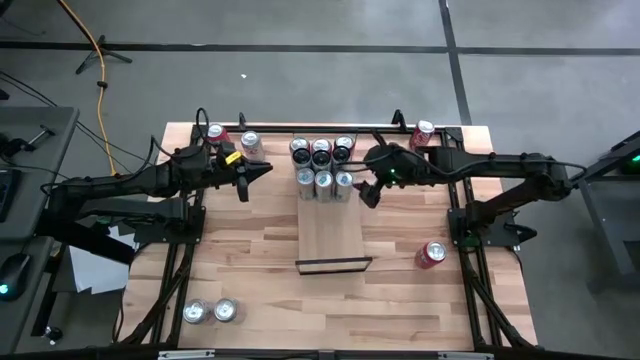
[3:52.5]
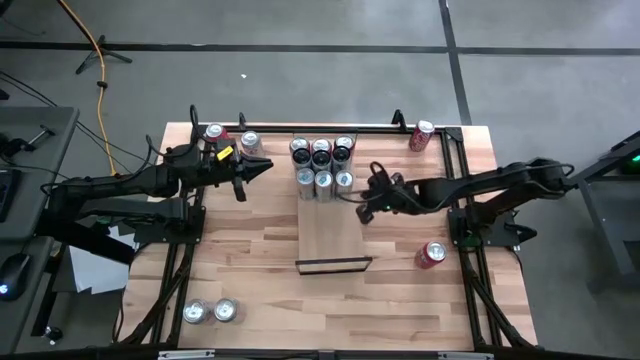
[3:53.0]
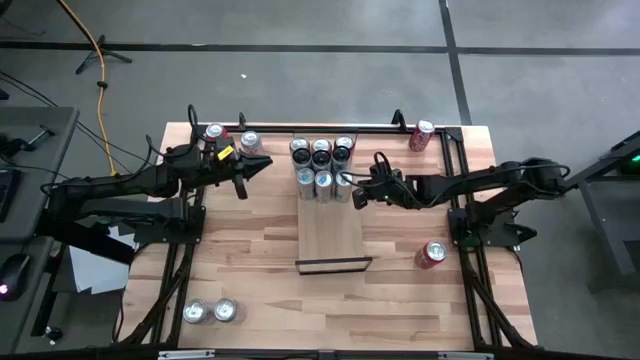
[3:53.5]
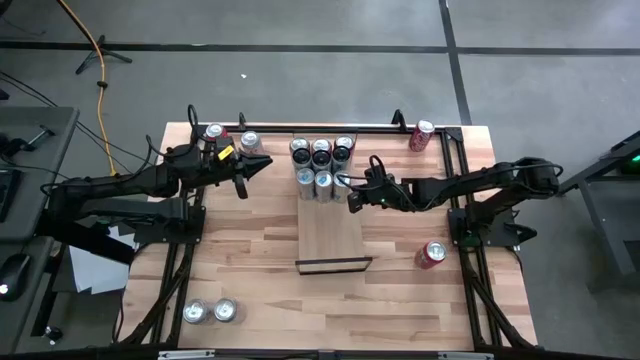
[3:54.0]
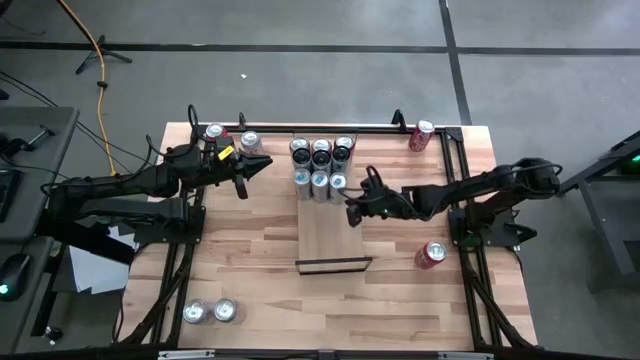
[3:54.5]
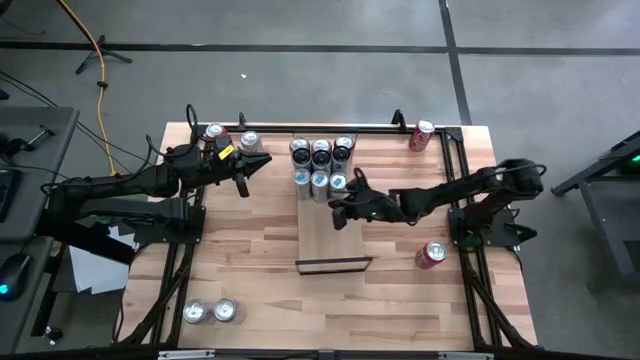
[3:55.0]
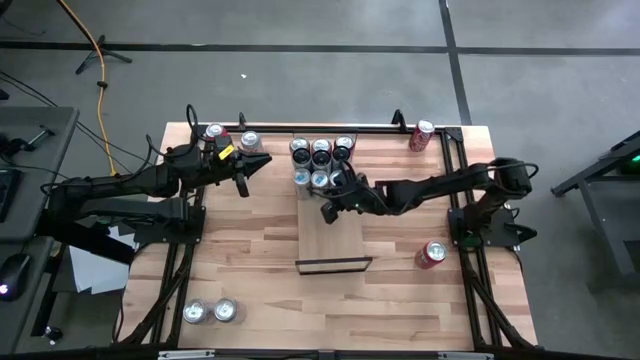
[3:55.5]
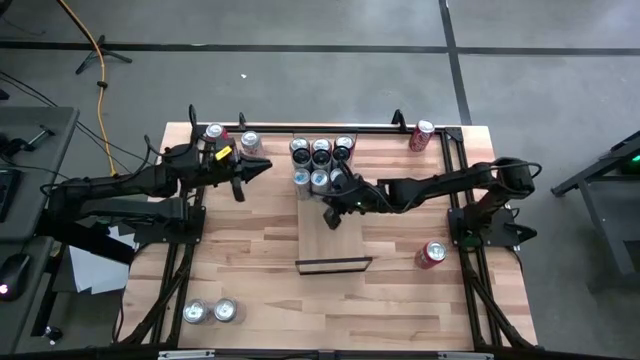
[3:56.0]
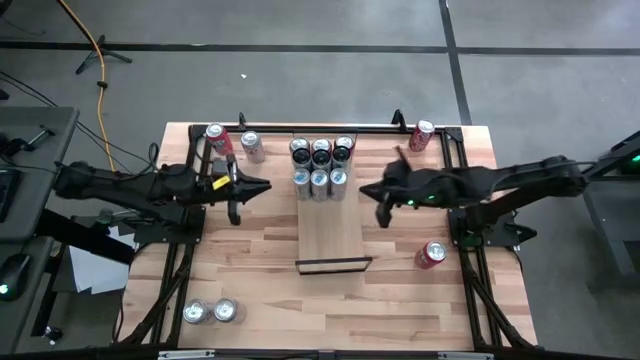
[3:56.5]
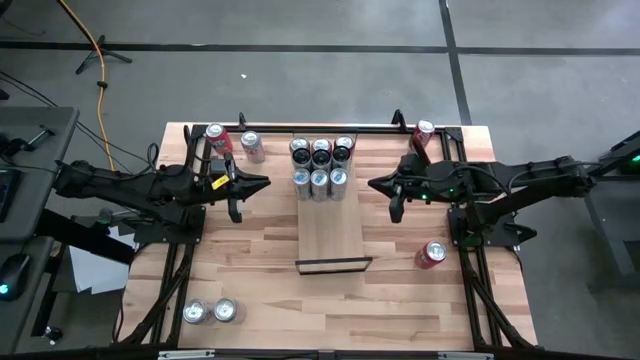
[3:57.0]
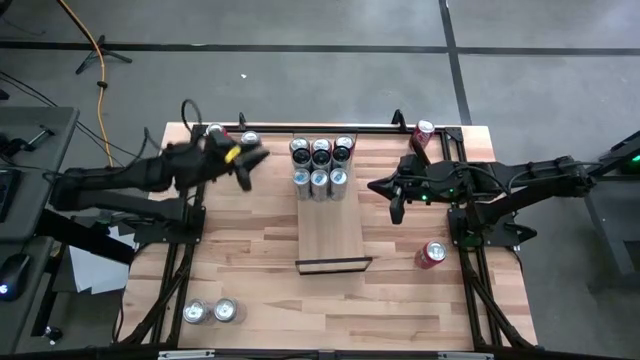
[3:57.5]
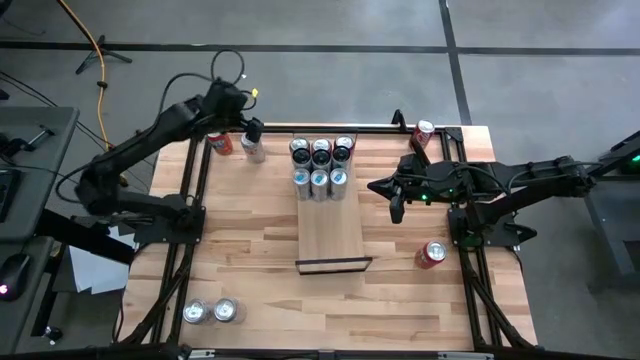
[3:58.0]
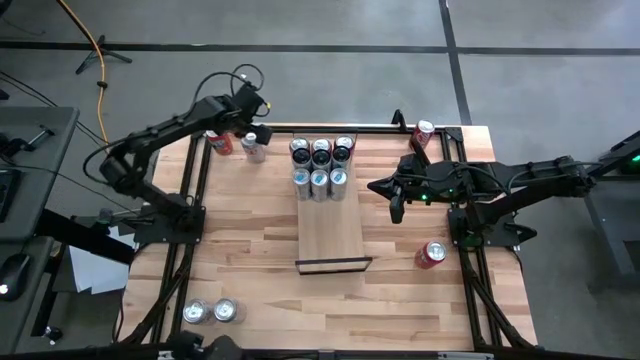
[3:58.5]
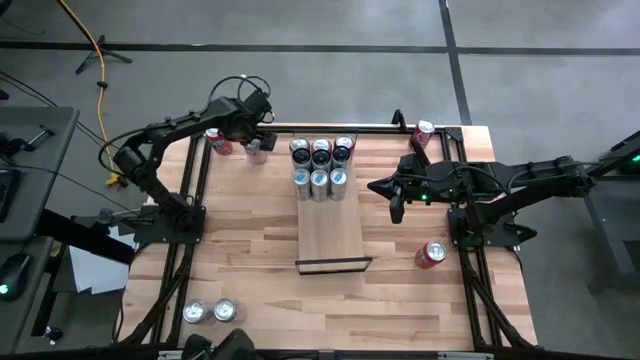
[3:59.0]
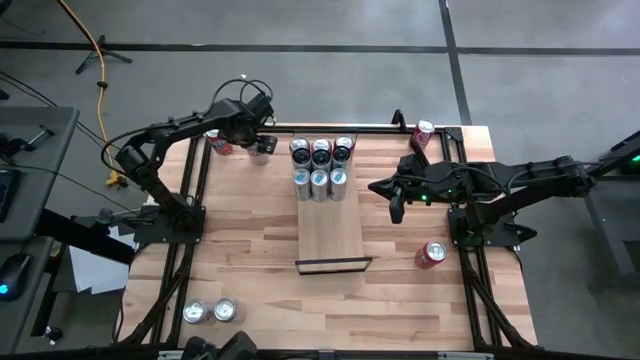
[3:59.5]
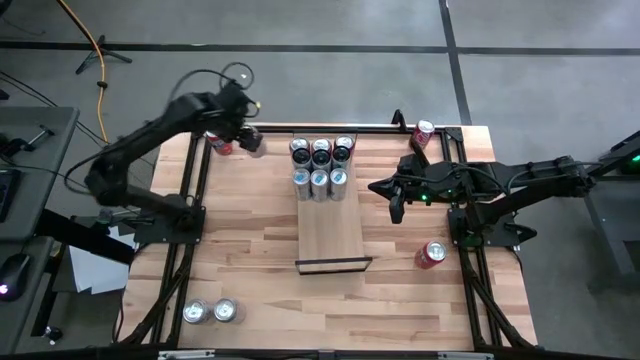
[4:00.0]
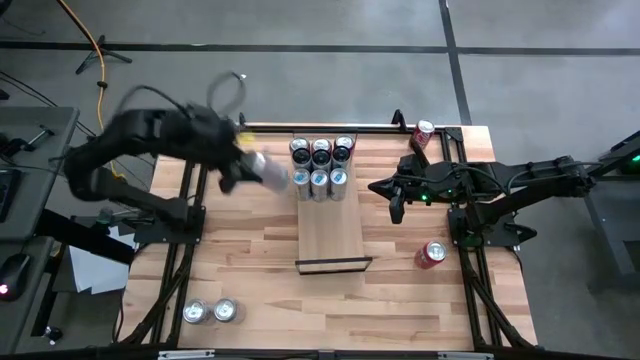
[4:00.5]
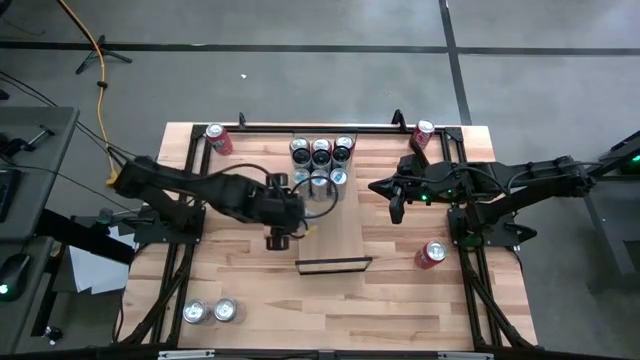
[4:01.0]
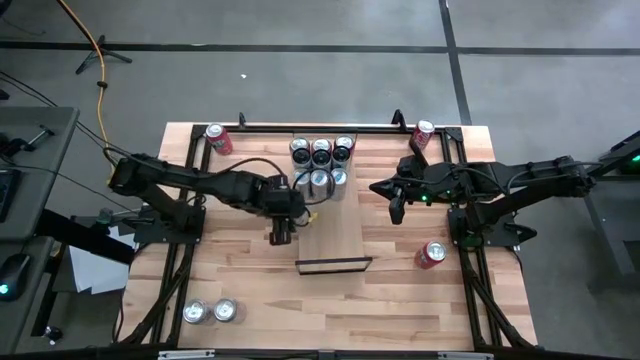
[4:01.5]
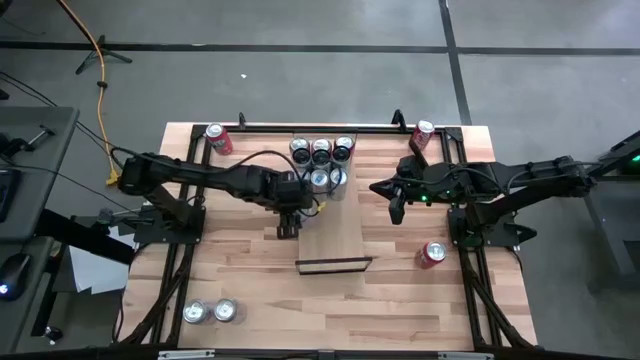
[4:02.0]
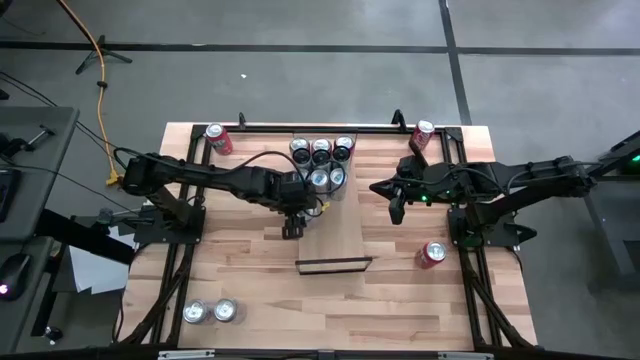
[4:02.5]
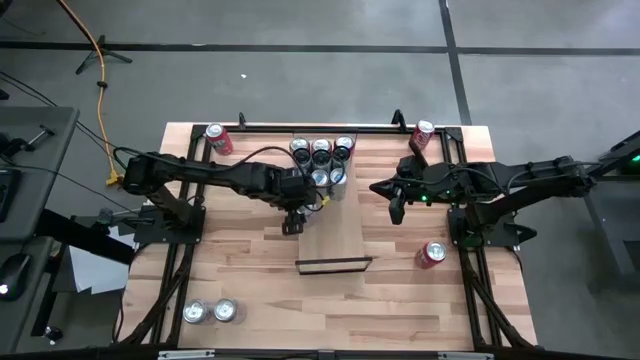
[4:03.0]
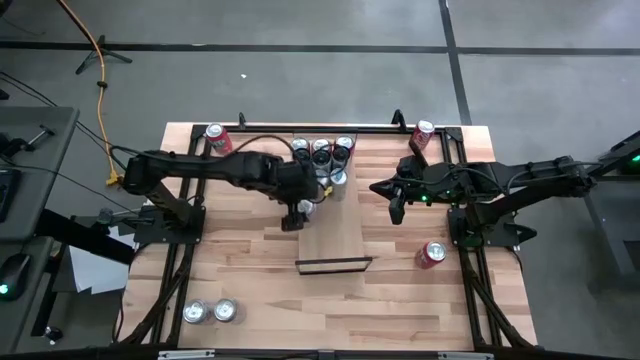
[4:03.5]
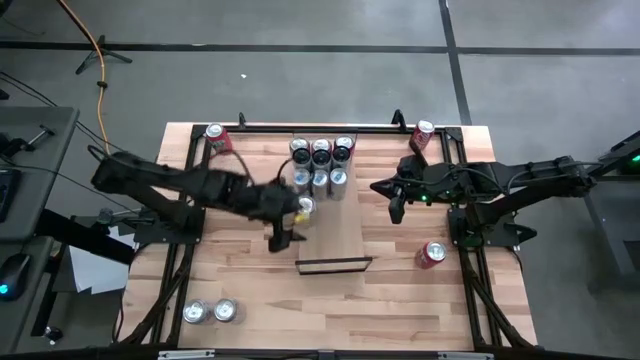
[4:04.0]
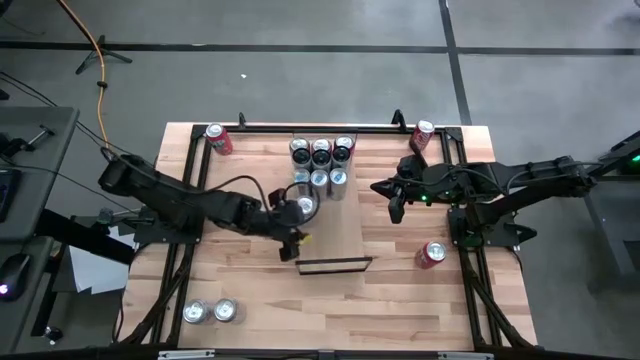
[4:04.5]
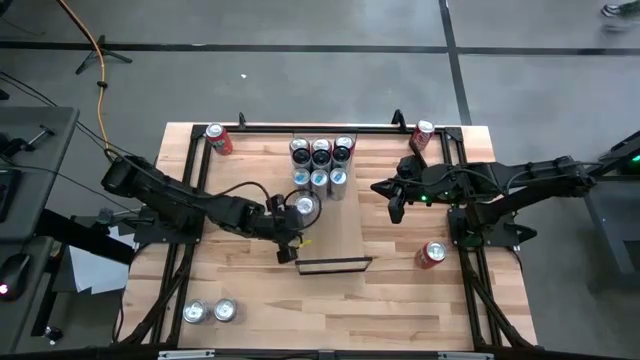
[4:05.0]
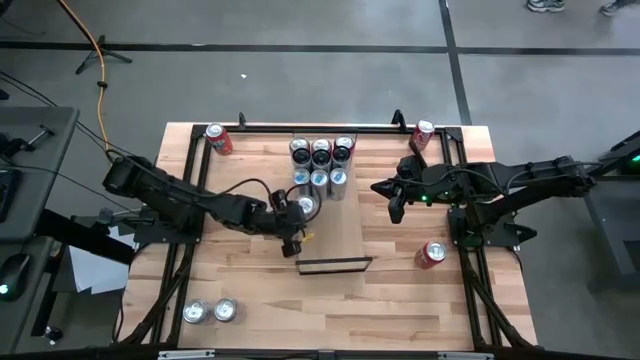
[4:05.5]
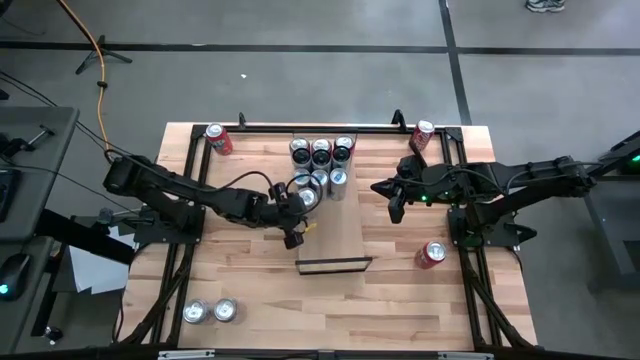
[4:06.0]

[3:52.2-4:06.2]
Task: Place canned beverage on shelf
Put the silver soda can on the shelf

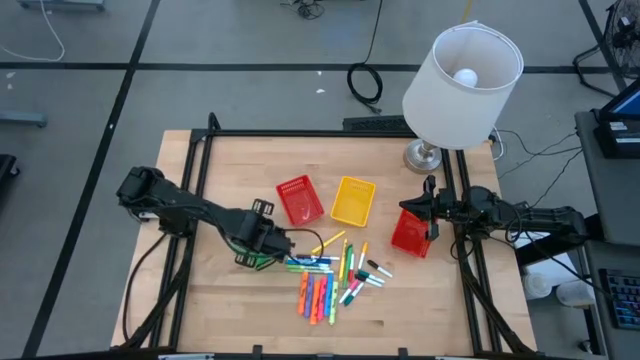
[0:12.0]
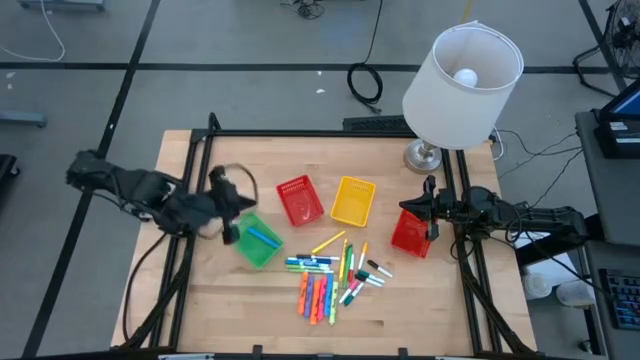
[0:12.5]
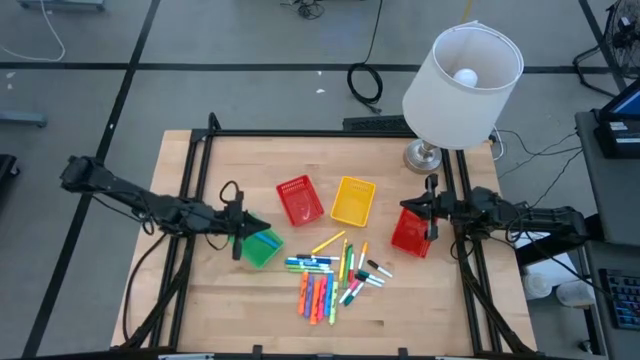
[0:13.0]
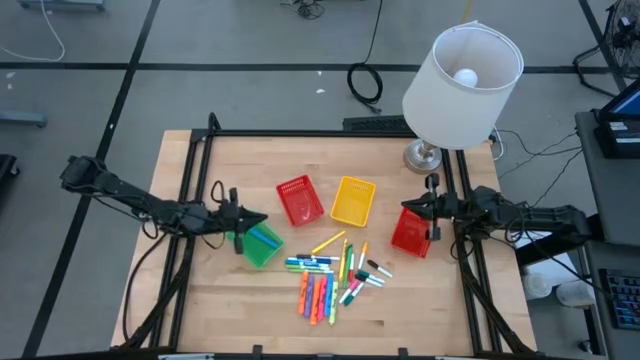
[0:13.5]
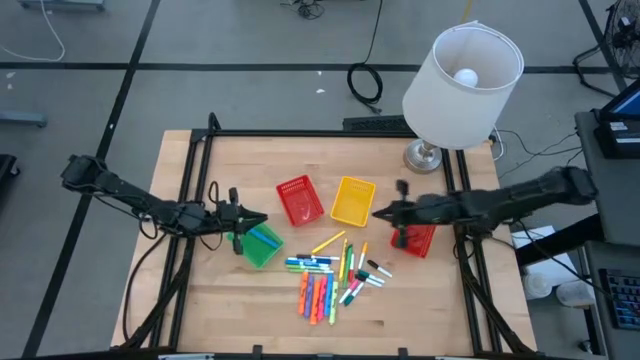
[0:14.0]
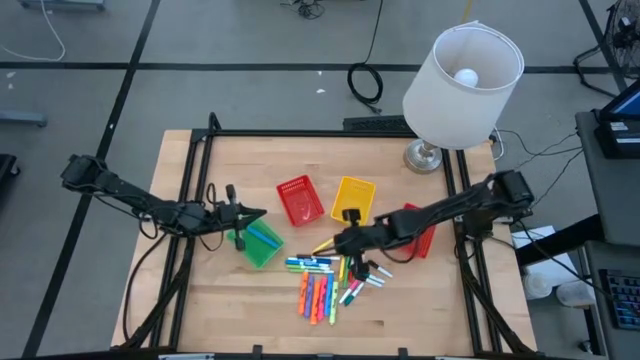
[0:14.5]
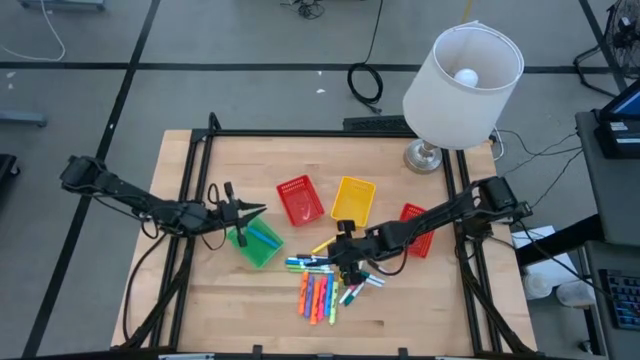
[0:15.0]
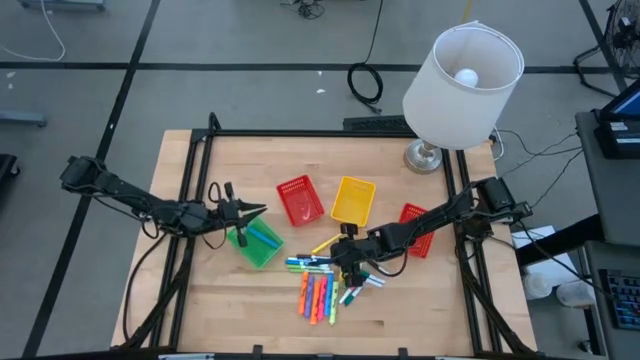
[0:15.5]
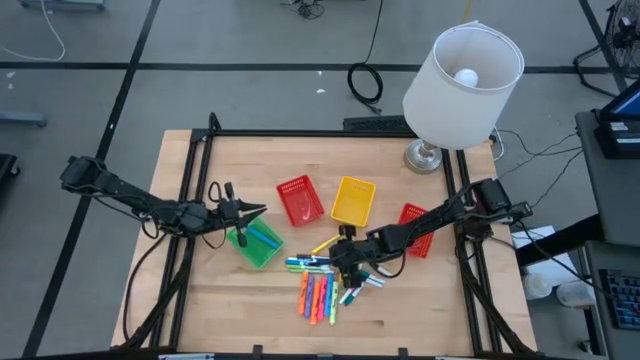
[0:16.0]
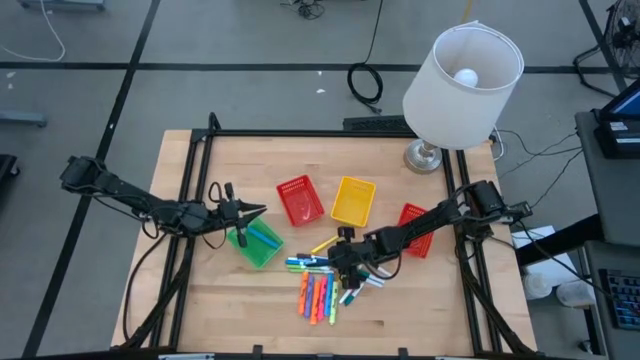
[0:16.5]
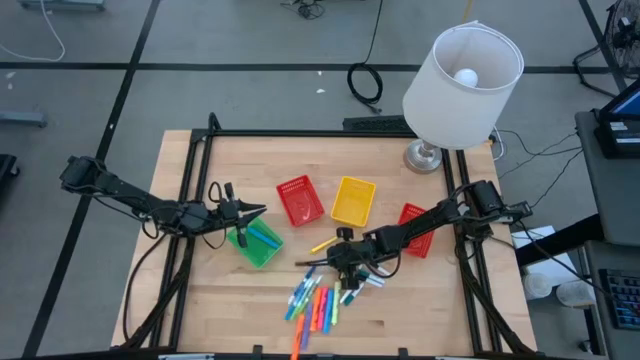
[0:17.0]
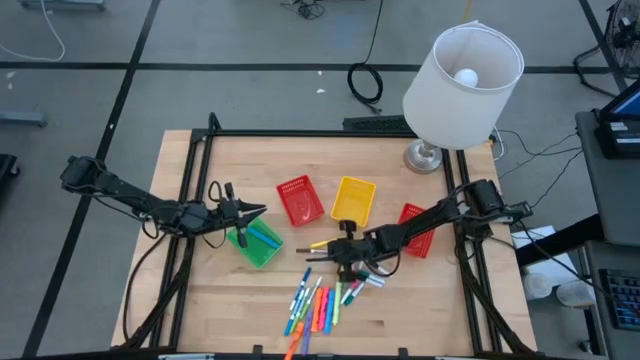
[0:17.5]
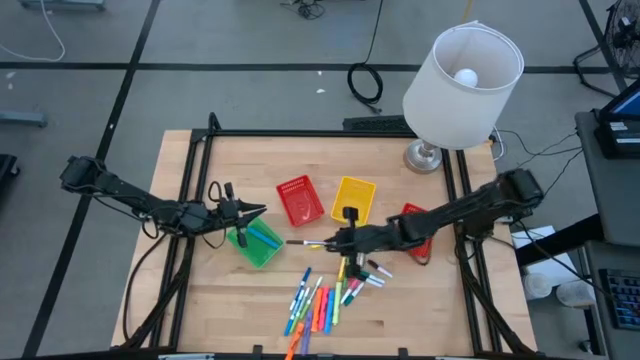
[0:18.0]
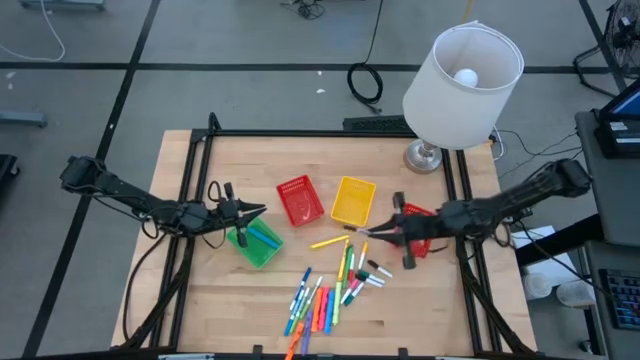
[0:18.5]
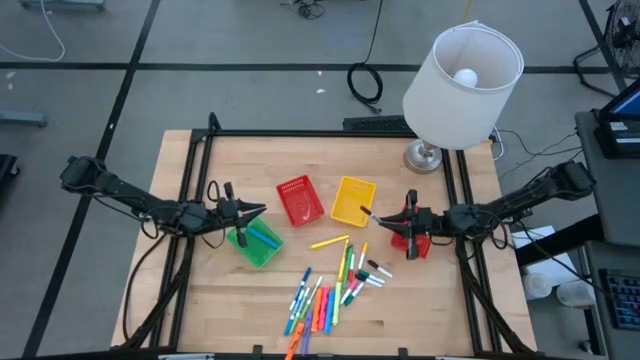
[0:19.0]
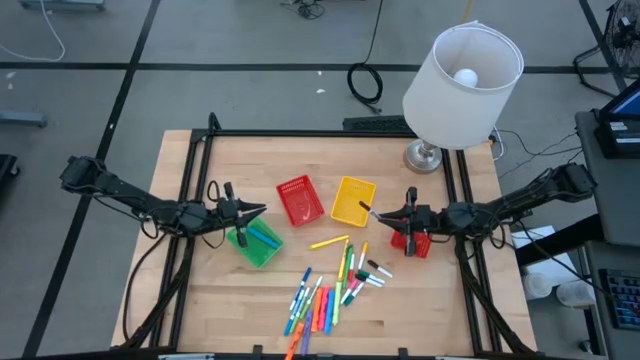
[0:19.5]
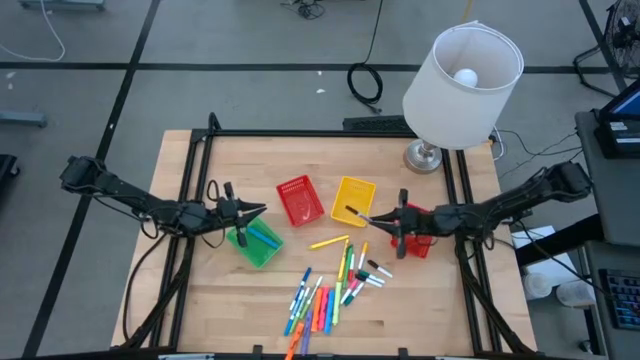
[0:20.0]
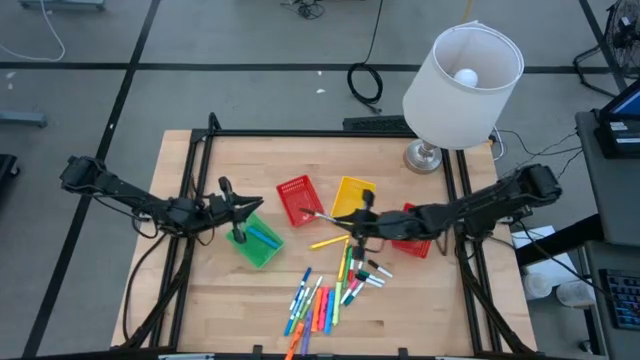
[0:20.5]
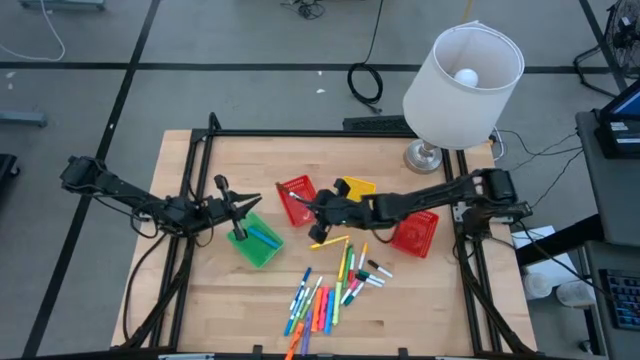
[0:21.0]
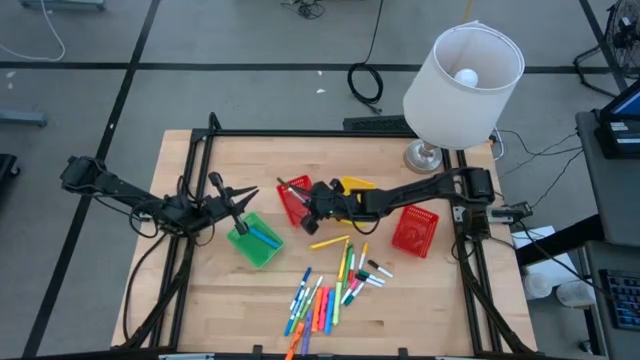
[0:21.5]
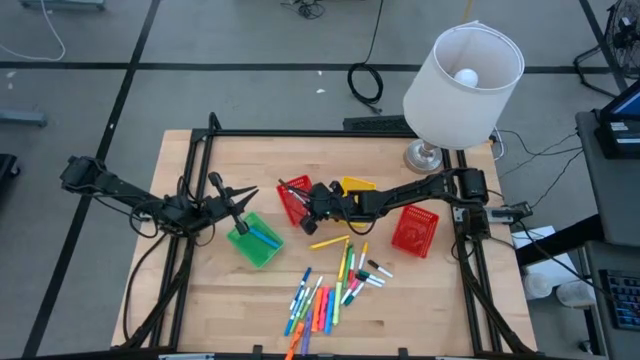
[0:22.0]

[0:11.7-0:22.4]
Task: Pick & Place Markers
Put the white and brown marker into the left red bin
